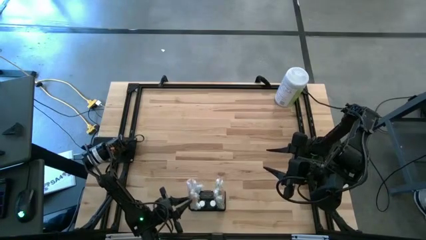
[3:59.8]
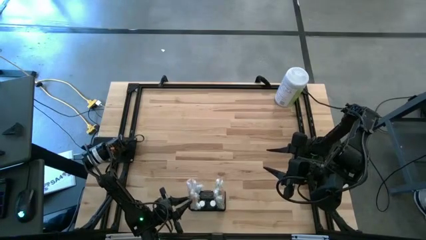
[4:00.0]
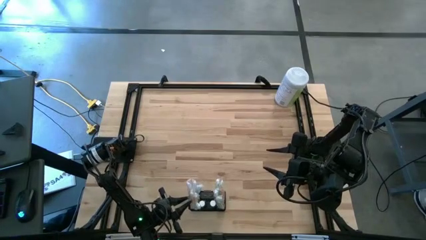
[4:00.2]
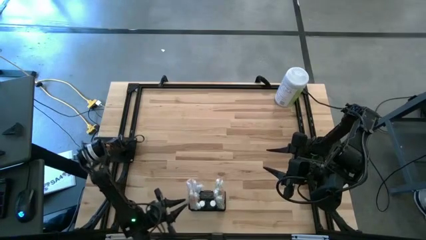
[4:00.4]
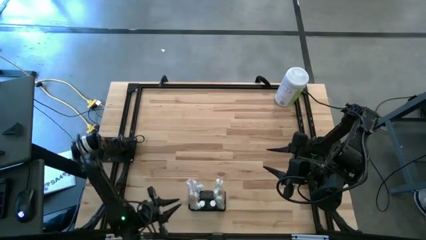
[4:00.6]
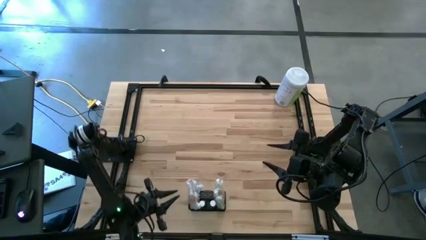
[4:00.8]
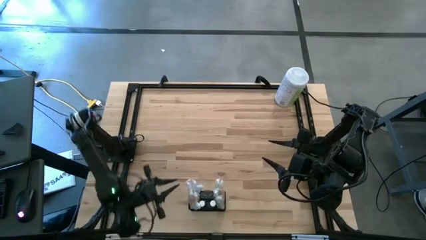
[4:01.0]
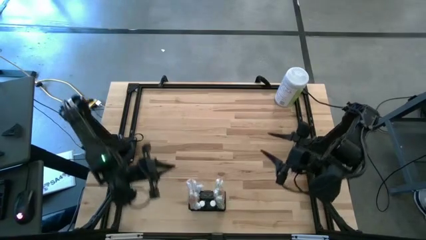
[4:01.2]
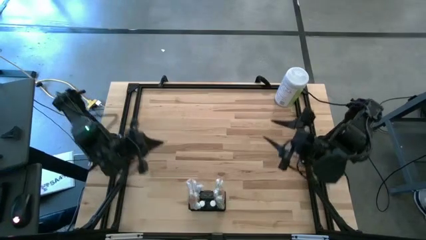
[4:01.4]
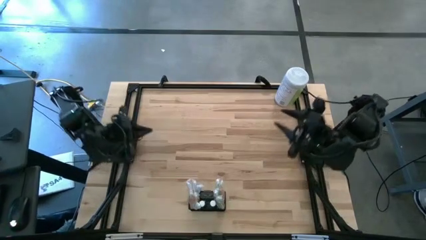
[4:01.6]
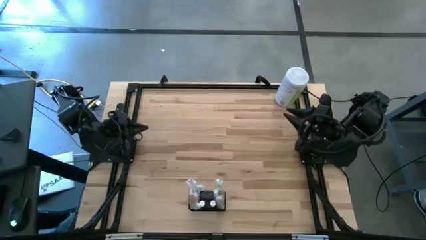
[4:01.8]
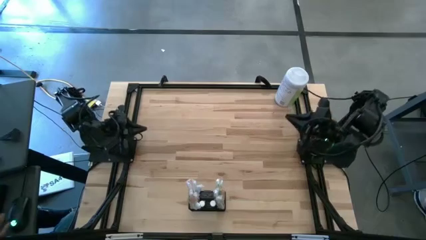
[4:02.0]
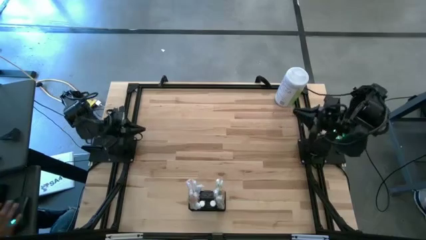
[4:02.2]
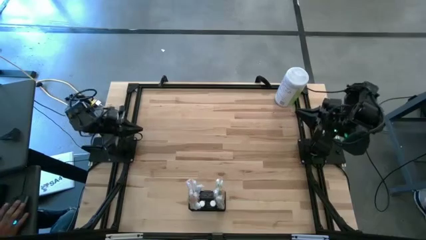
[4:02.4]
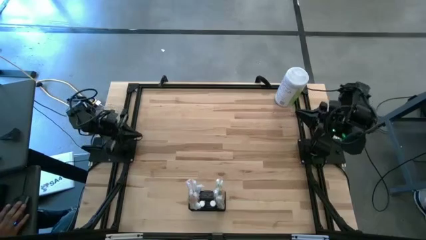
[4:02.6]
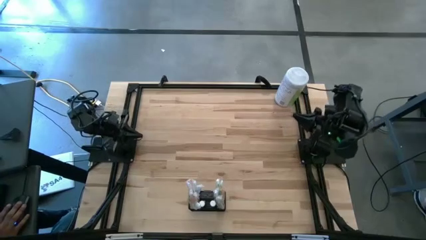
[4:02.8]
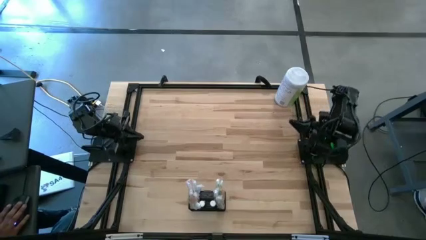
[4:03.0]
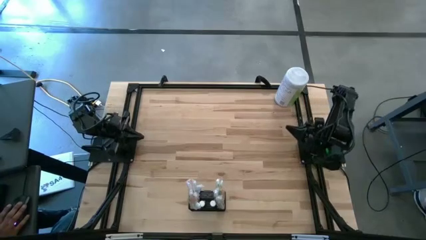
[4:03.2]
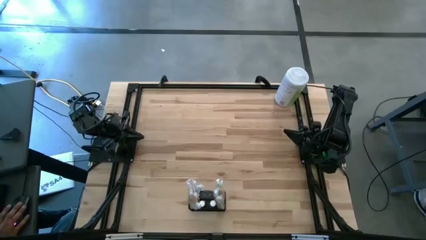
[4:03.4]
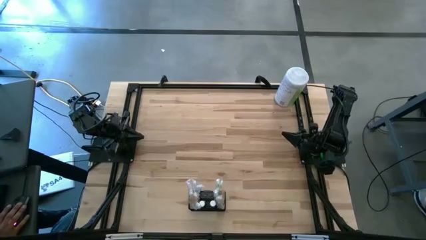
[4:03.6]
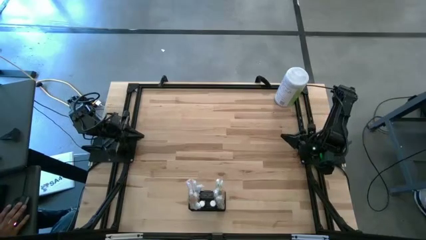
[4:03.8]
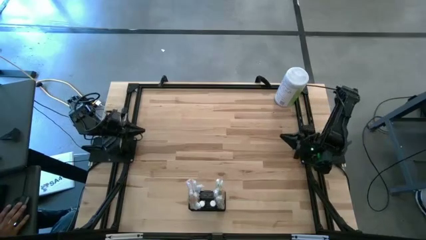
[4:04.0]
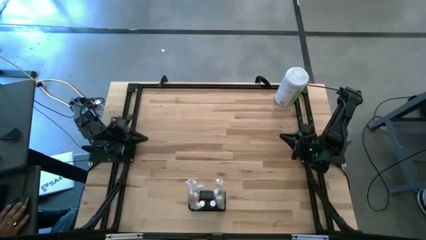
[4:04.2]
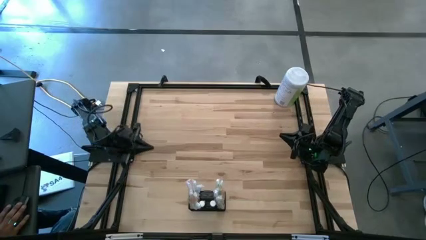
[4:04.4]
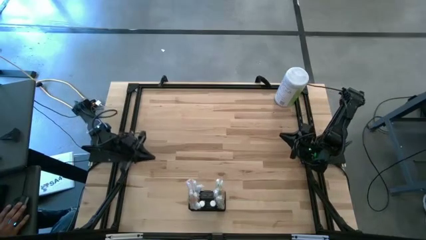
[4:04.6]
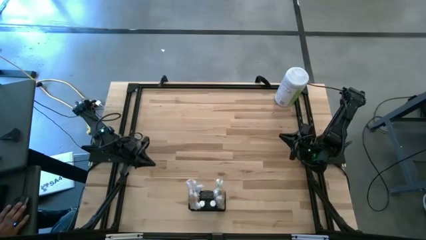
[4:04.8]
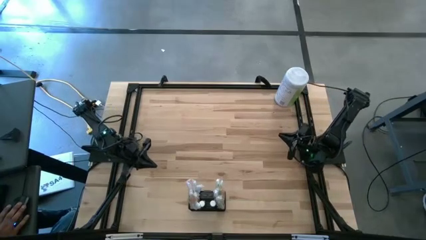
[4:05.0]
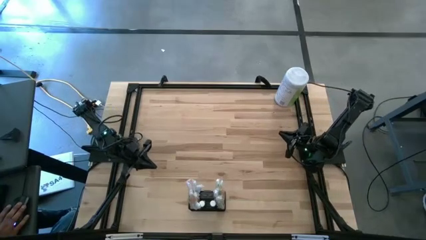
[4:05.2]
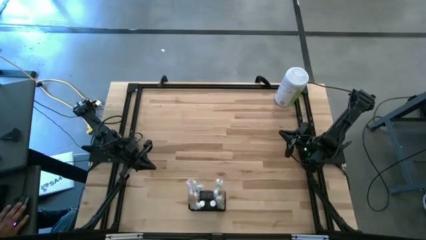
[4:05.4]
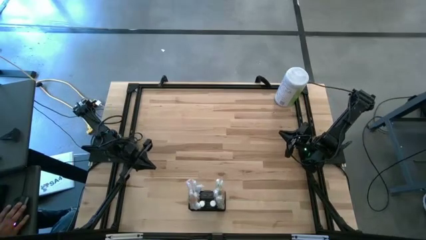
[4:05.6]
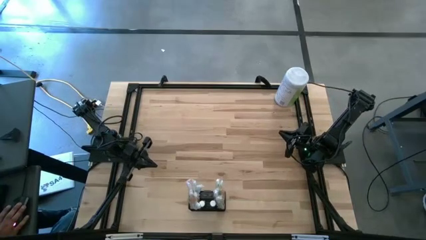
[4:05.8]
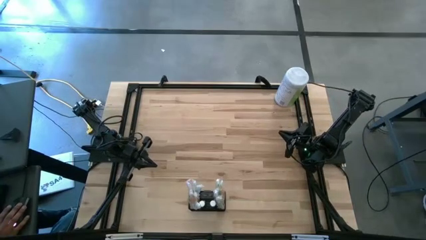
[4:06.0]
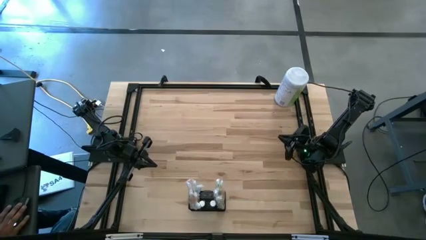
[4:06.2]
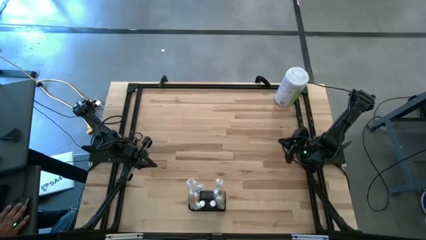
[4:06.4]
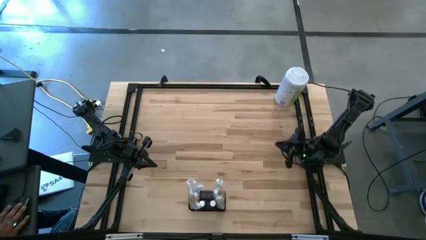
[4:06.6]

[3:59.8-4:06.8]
Task: Pick & Place toothbrushing station
Return to Home Position

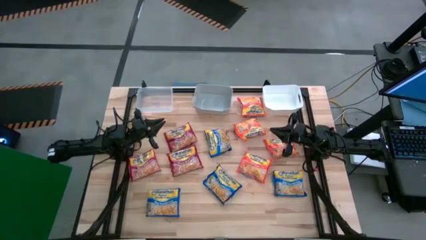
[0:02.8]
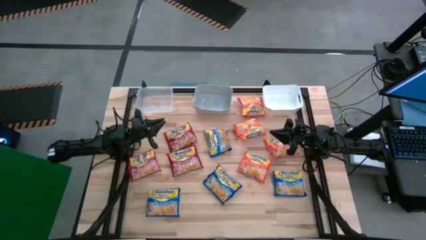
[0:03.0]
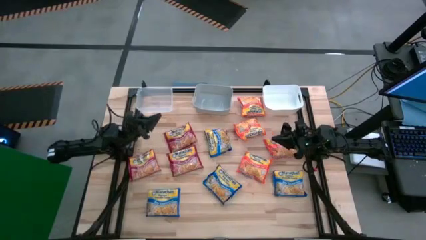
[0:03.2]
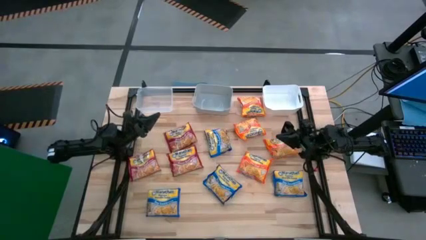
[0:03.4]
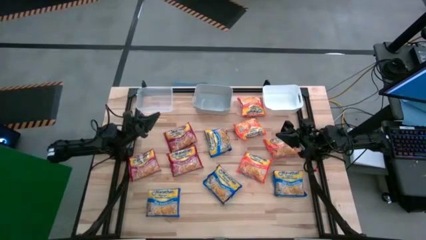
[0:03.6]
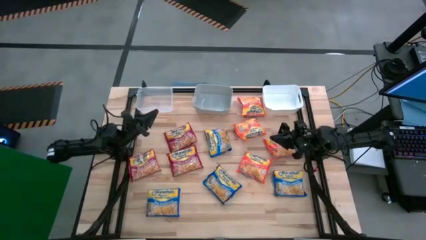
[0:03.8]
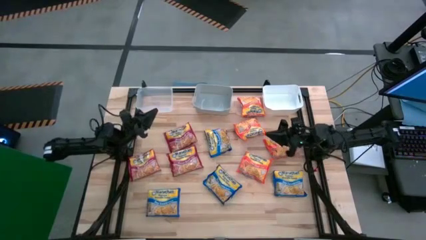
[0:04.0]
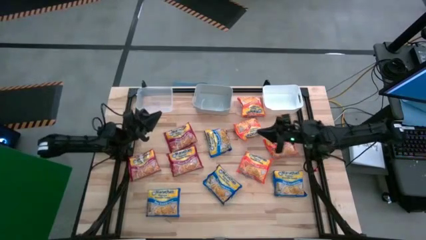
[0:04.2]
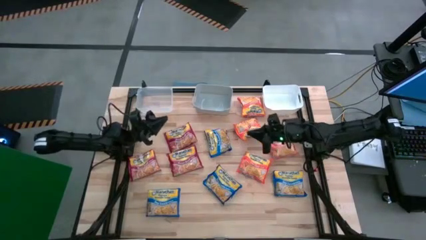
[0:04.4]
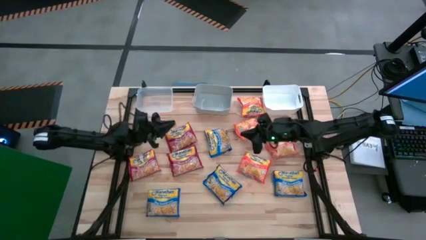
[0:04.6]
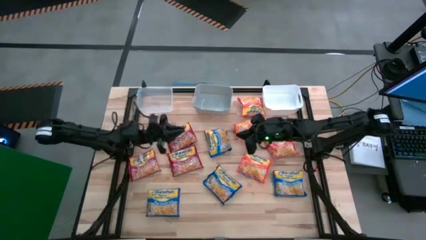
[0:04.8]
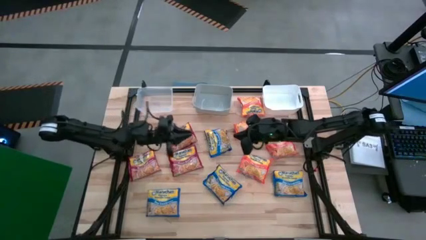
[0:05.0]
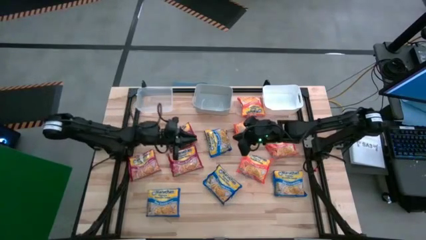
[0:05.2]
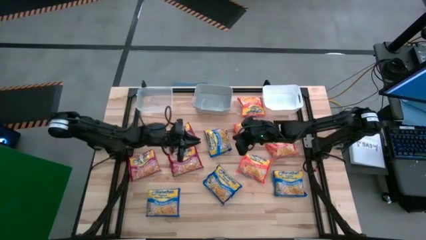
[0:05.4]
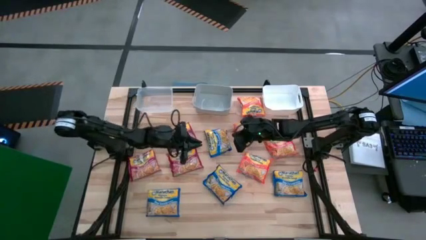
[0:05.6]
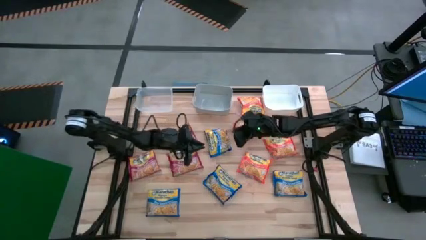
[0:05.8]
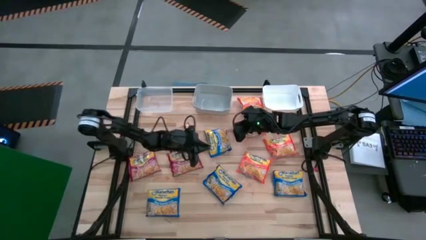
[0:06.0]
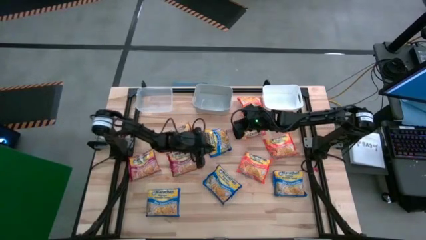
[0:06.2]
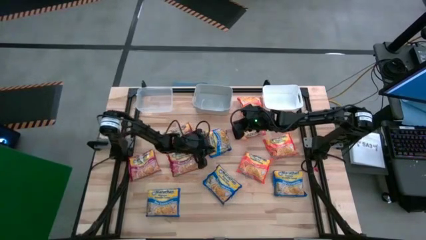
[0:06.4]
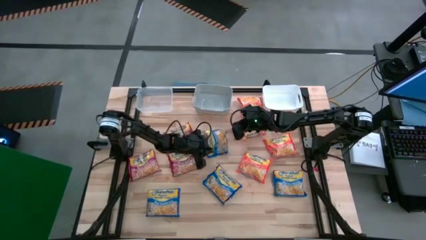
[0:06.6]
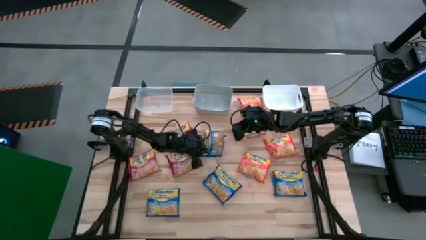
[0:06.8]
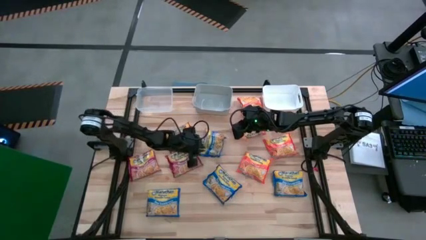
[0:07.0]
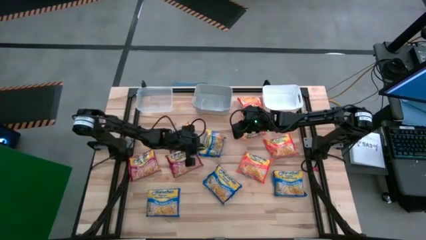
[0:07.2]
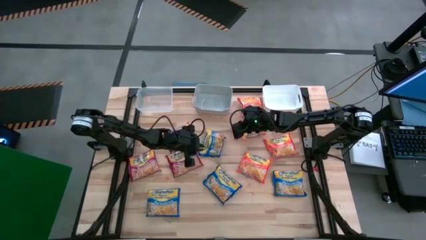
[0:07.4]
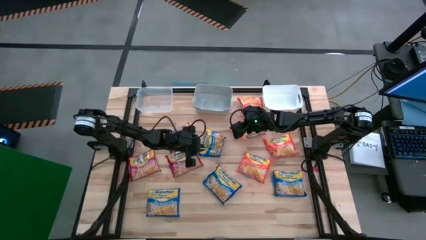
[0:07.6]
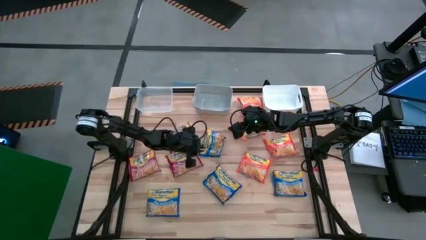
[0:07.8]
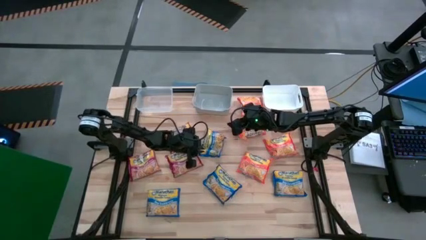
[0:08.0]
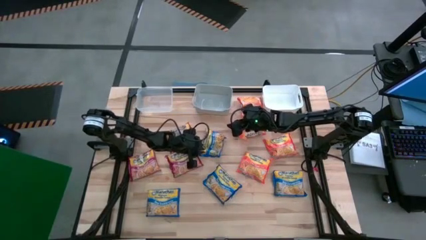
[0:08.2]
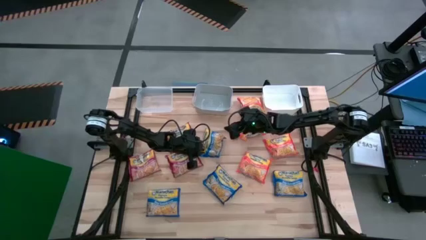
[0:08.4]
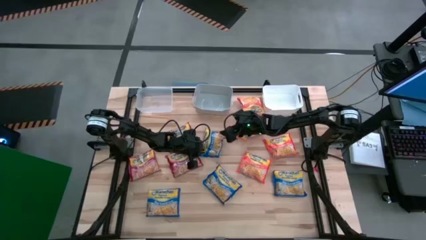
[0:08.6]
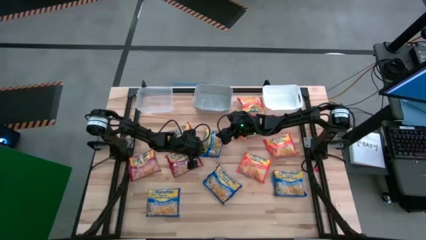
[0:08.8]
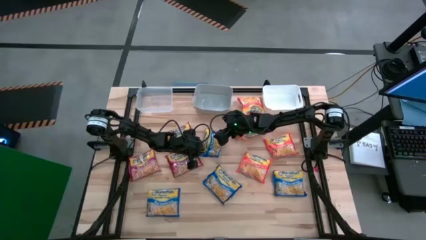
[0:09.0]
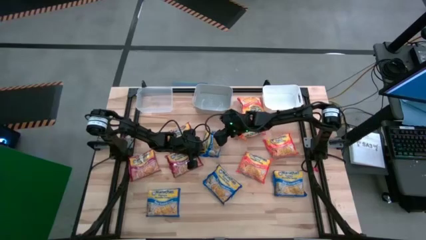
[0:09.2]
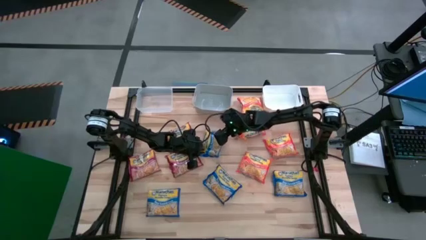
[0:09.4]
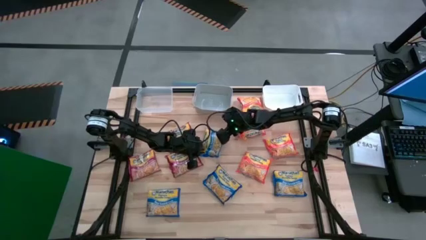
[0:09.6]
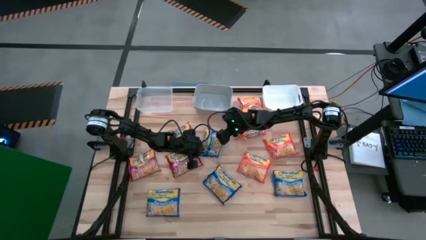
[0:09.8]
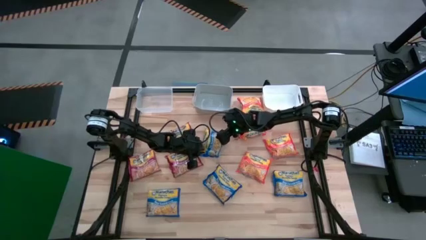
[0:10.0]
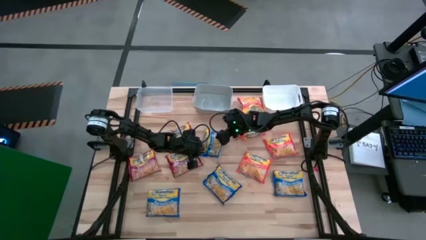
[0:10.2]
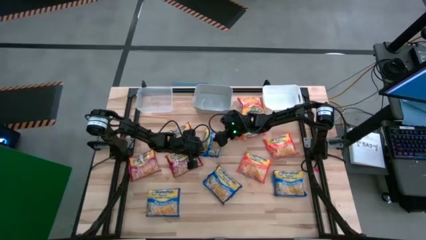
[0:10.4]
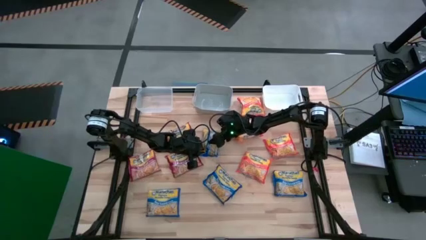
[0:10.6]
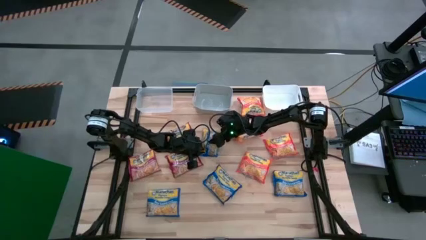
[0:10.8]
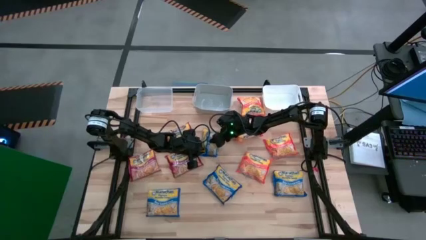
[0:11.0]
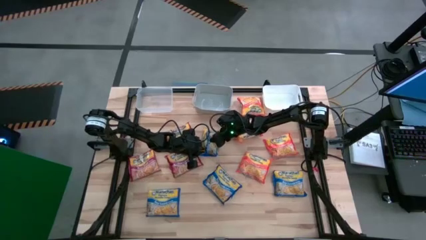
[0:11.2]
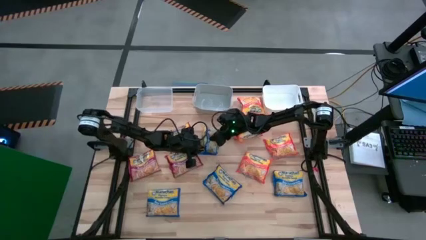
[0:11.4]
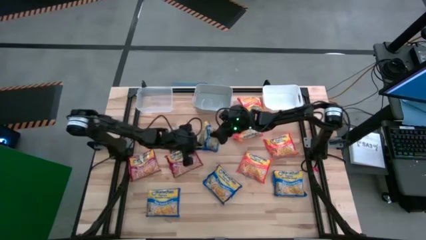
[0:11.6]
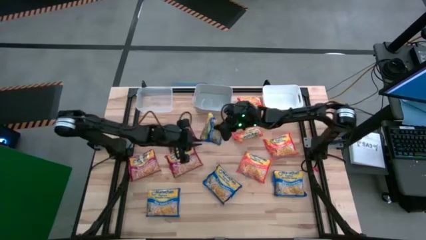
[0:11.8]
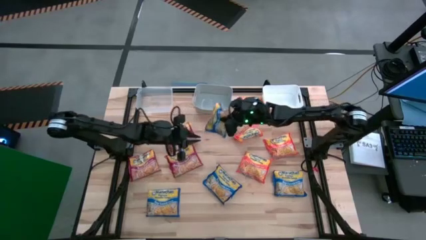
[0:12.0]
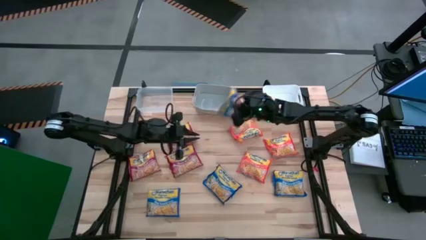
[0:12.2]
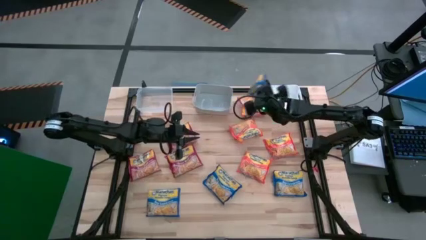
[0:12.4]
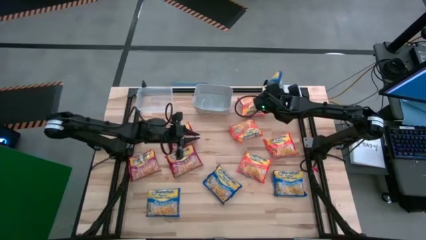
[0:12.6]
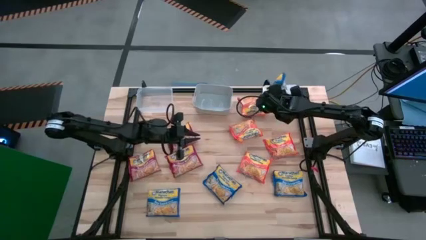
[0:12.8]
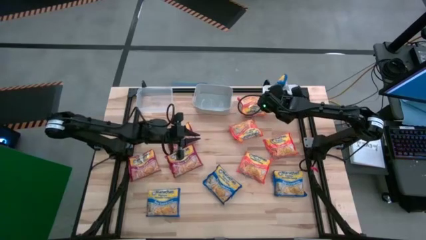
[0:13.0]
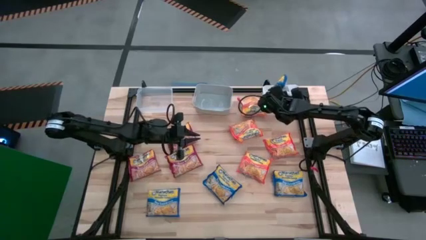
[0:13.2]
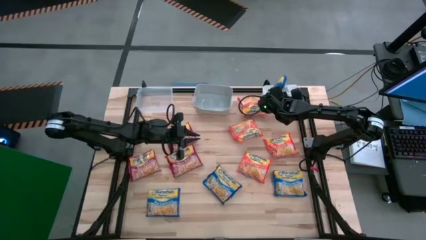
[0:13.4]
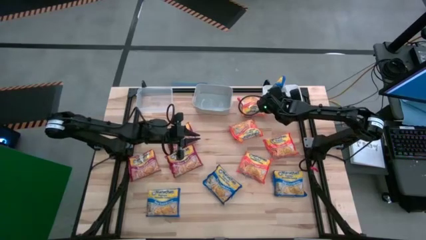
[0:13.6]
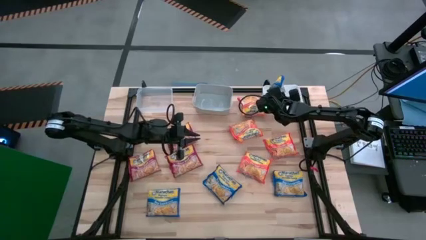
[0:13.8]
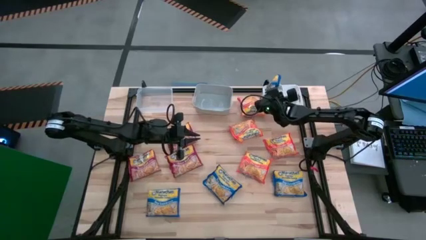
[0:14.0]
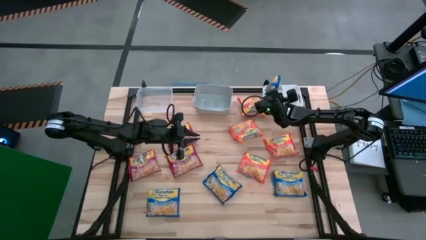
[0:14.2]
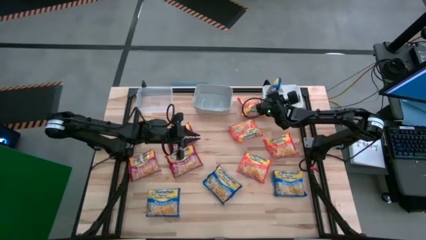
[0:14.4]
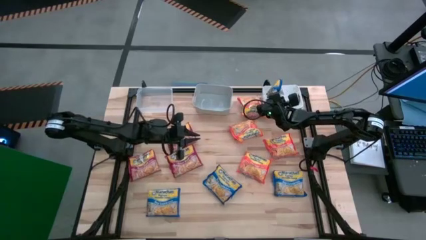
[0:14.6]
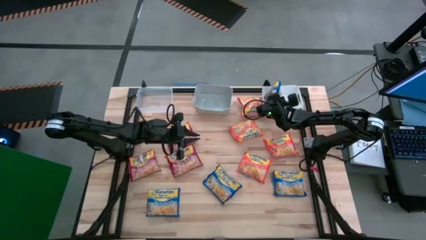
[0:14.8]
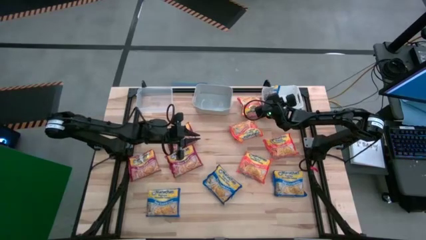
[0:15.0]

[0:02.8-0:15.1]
Task: Sort Maruchan noodles
Put the blue noodle pack into the white bin
